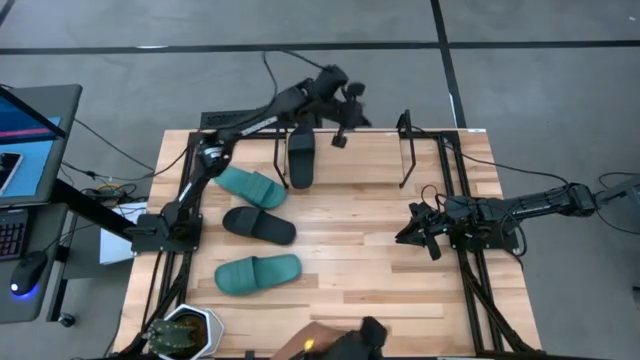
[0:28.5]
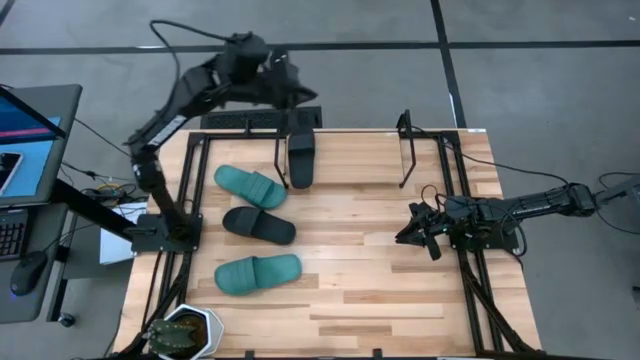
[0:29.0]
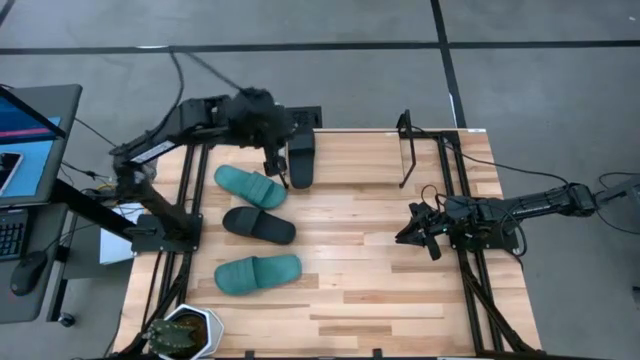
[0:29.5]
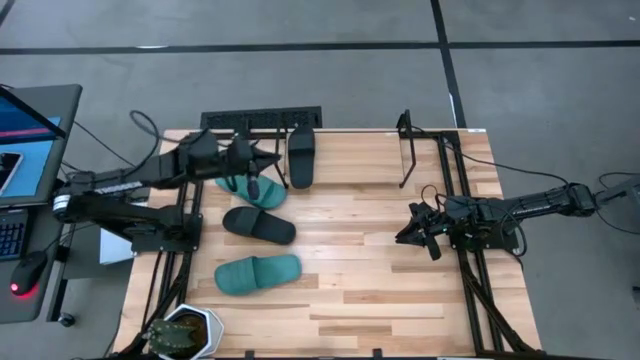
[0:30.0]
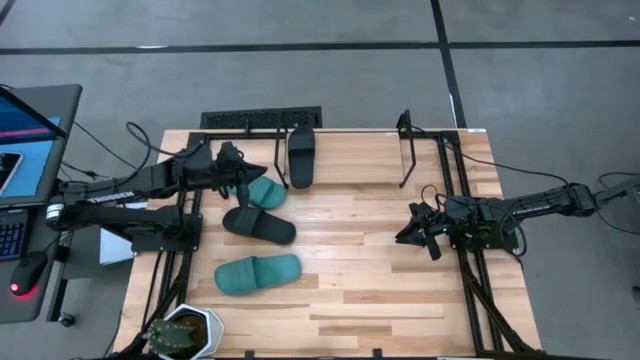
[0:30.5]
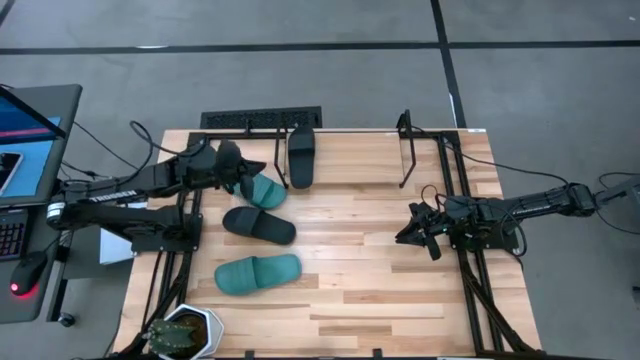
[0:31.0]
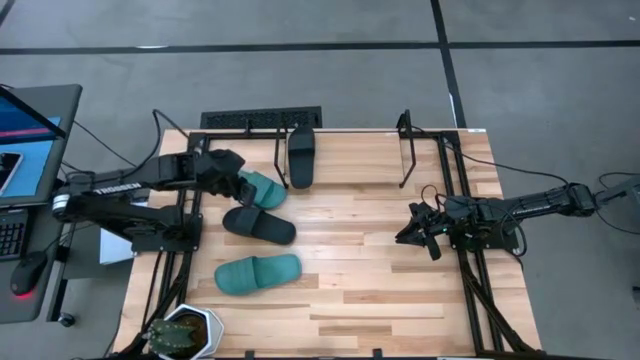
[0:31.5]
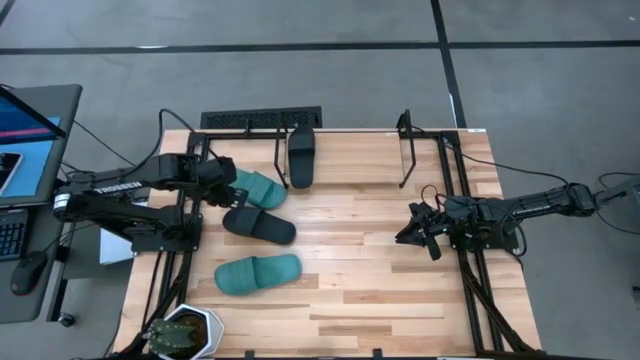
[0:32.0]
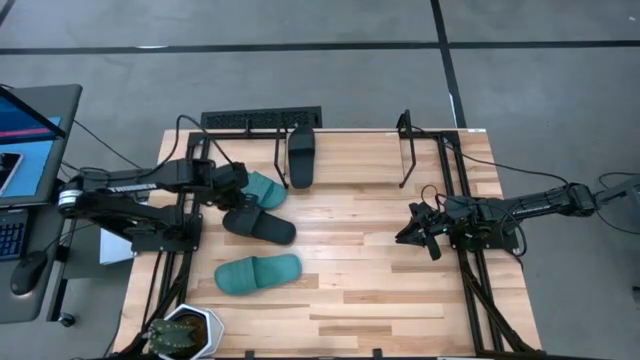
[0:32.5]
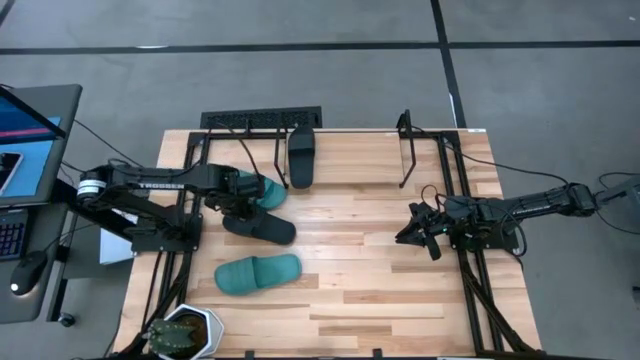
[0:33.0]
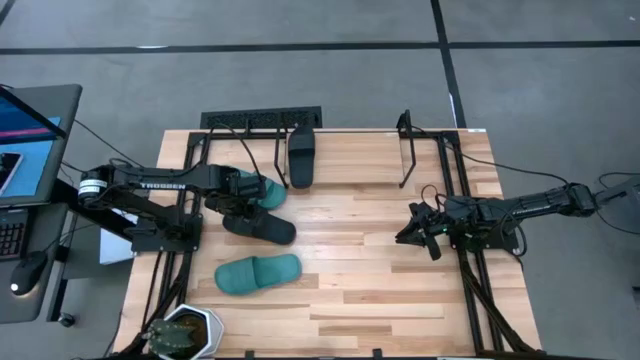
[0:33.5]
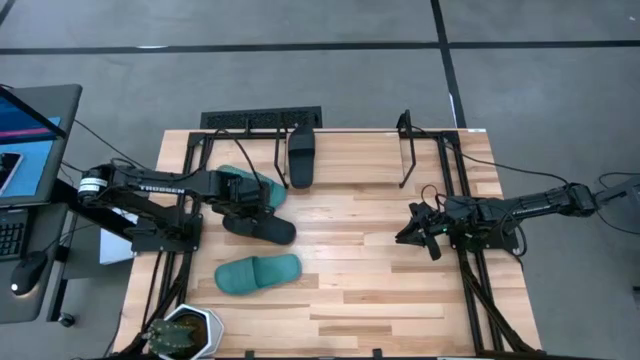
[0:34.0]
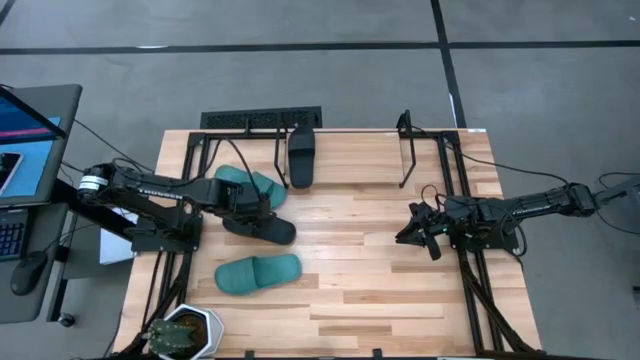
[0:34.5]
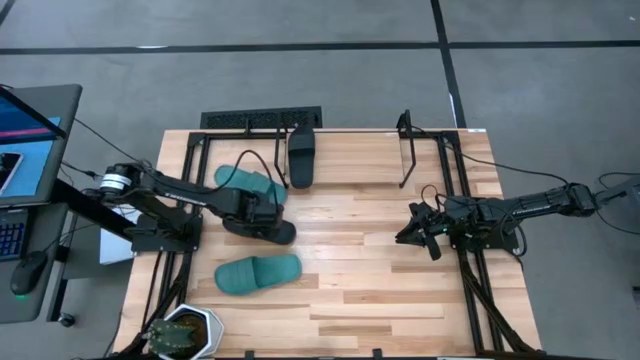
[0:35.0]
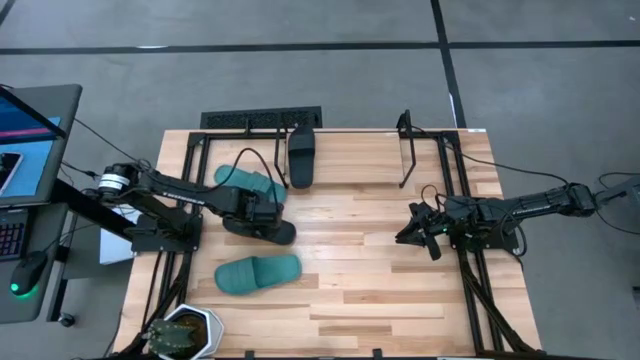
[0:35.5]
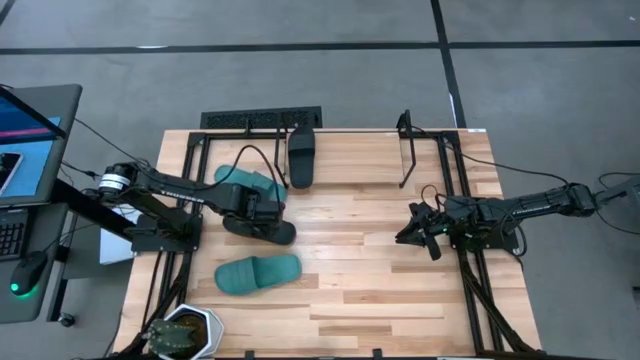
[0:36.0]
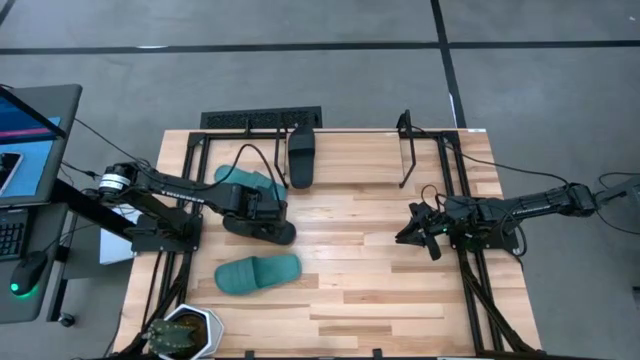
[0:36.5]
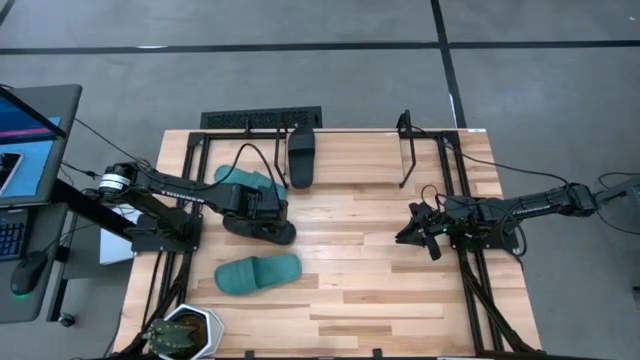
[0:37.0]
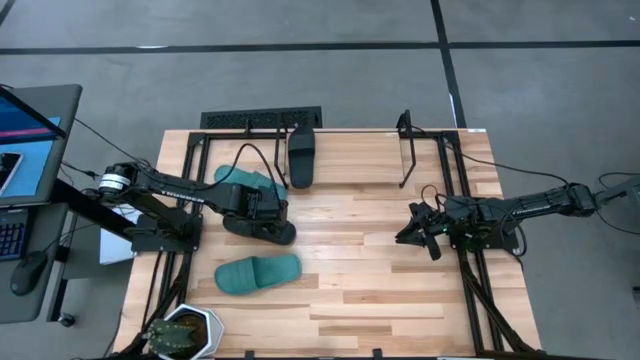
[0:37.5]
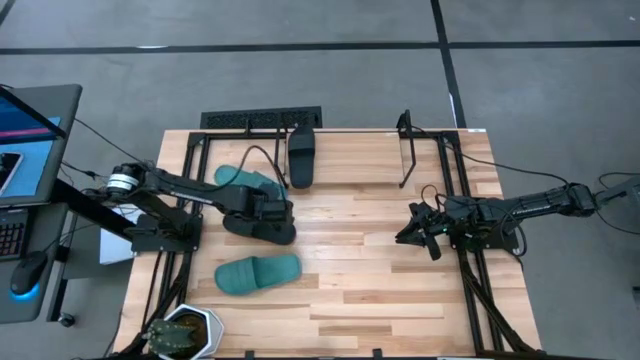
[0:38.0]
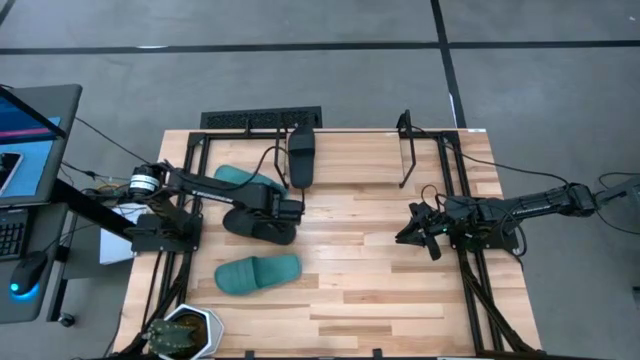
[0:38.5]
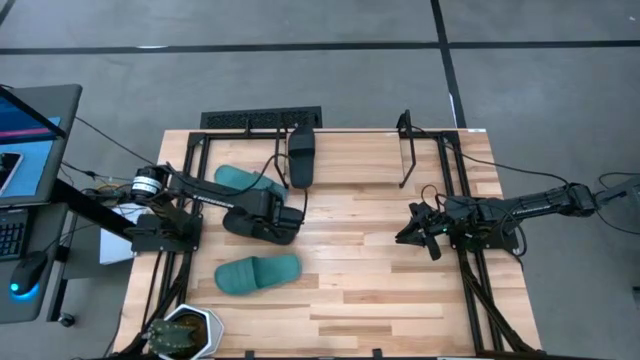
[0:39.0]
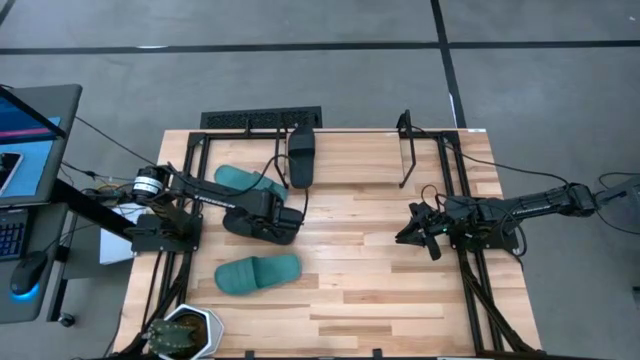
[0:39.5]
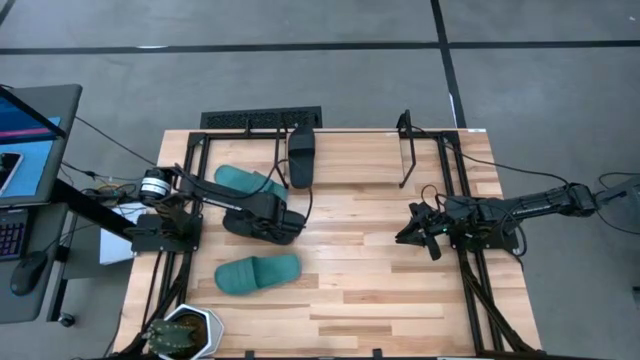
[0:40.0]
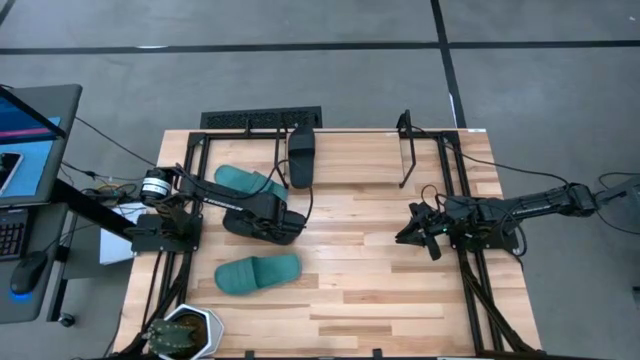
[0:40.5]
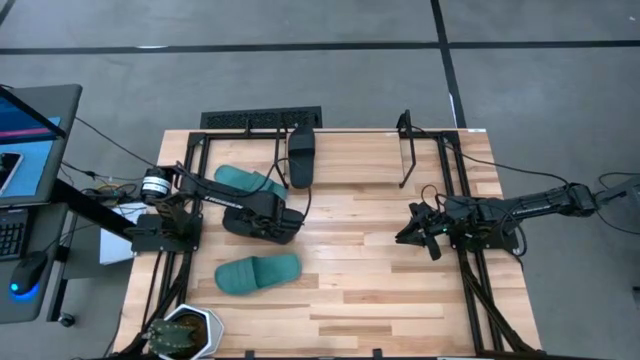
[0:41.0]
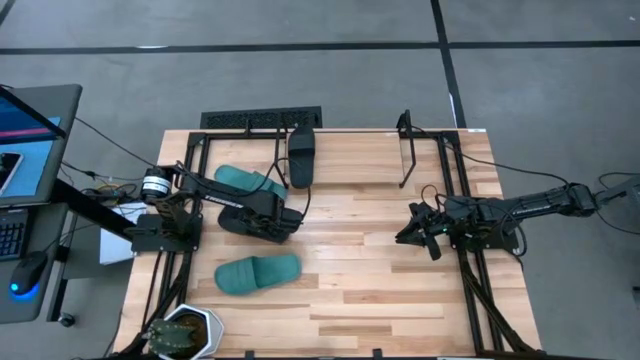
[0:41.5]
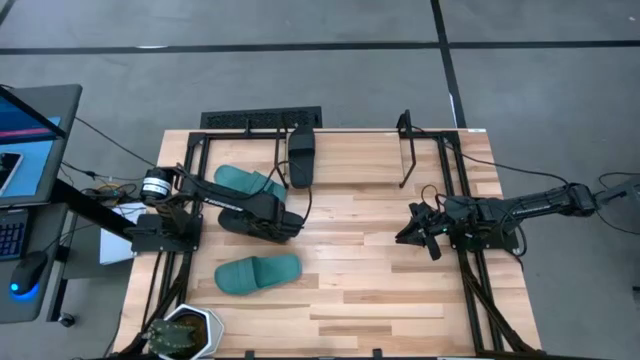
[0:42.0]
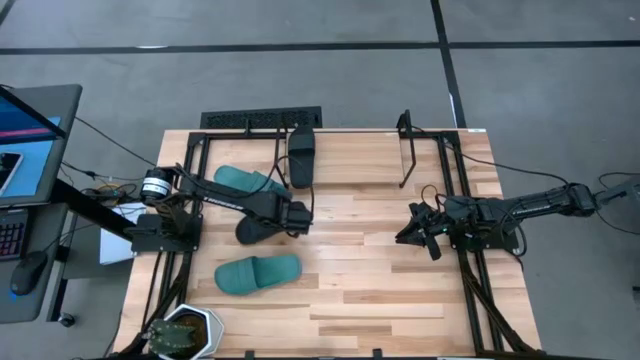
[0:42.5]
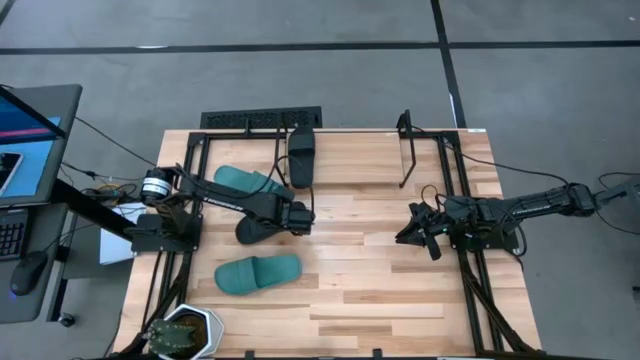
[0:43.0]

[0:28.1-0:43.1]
Task: Pick and place slides into the shelf
Put the black slipper on the shelf

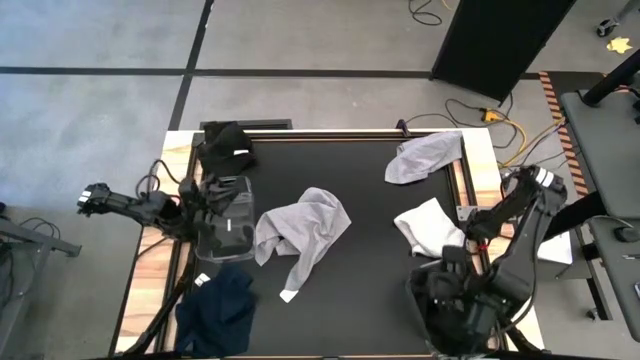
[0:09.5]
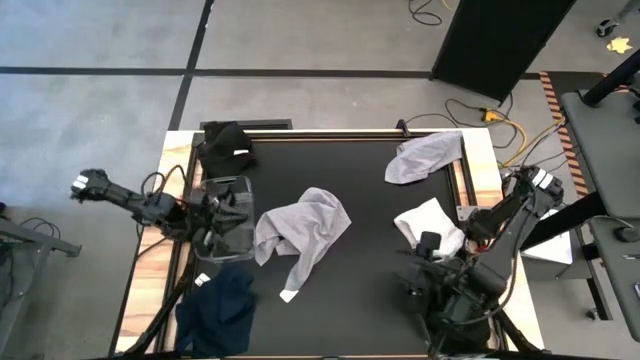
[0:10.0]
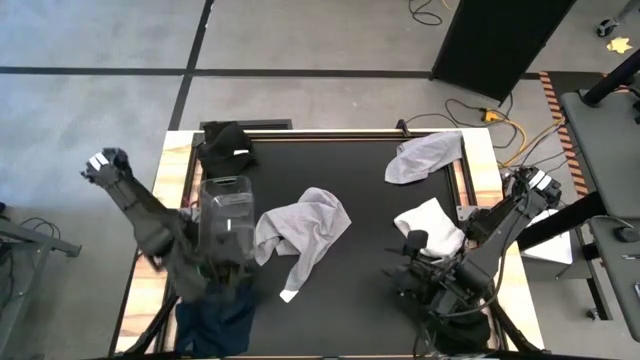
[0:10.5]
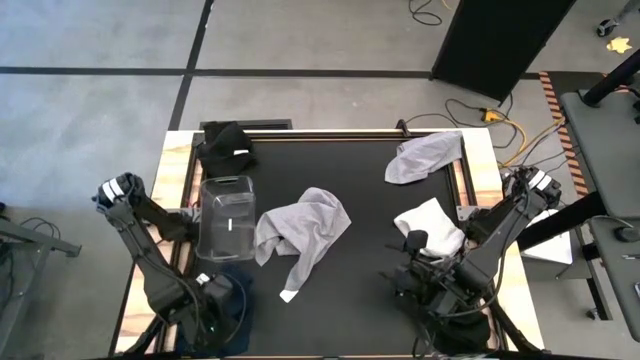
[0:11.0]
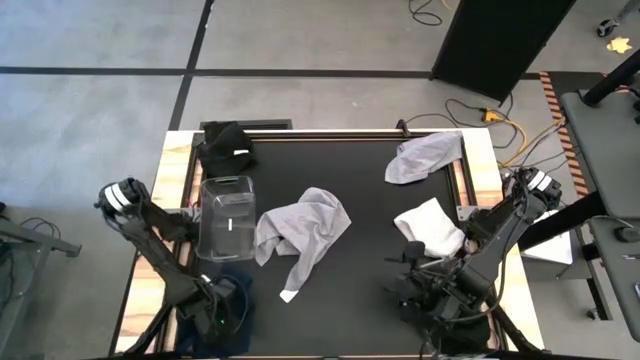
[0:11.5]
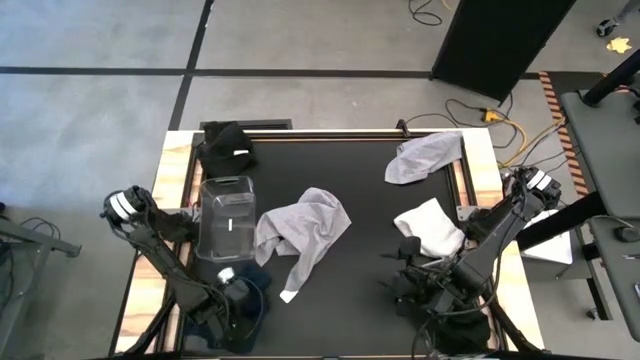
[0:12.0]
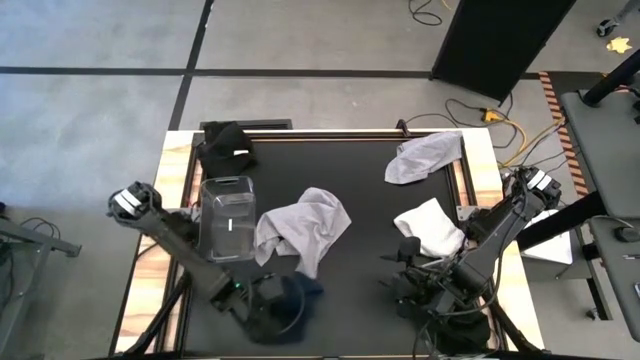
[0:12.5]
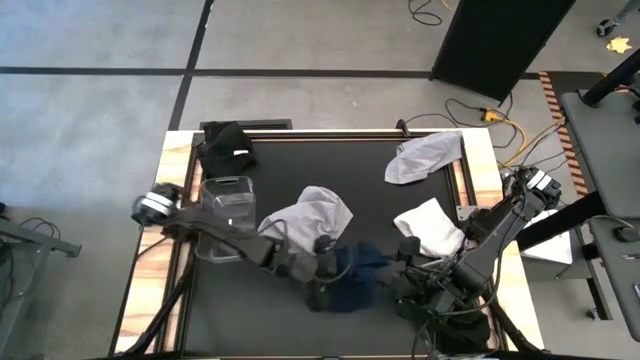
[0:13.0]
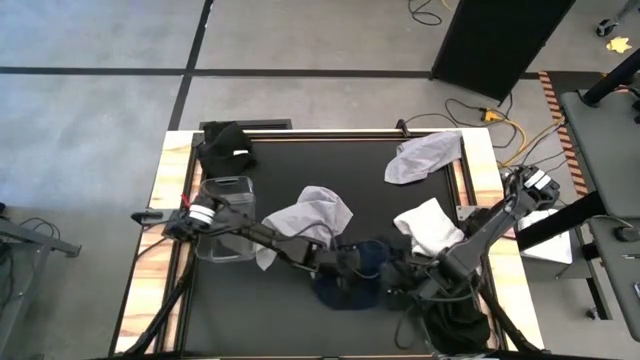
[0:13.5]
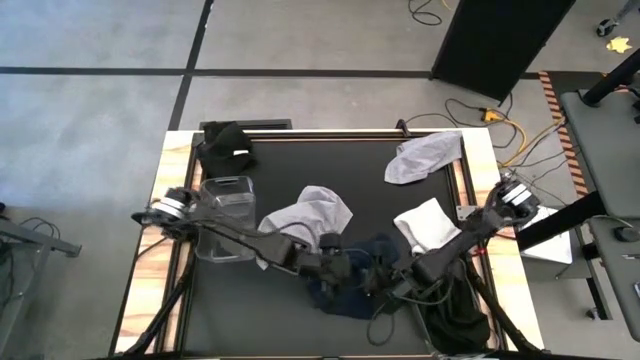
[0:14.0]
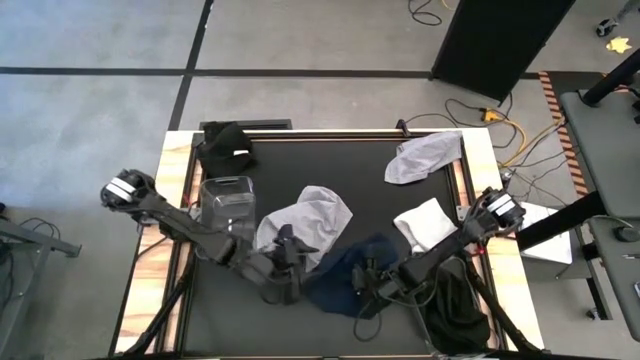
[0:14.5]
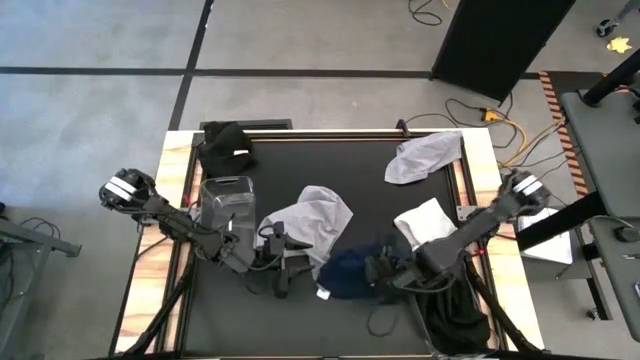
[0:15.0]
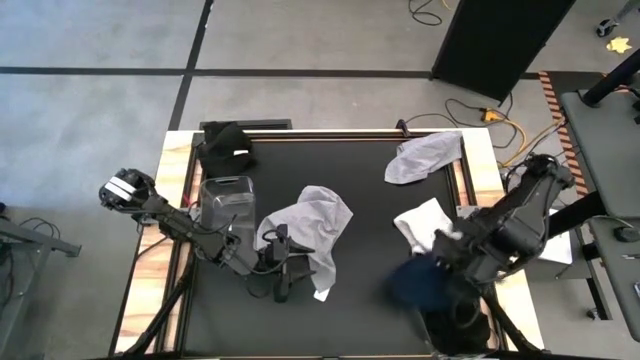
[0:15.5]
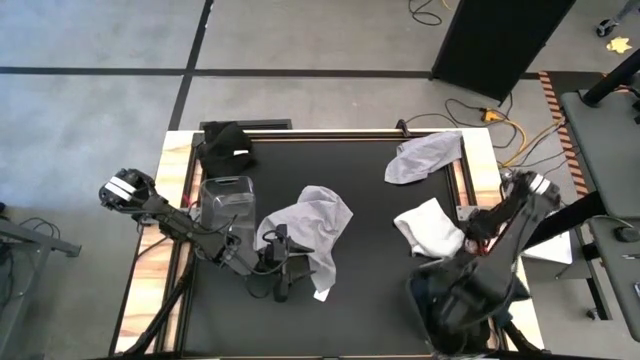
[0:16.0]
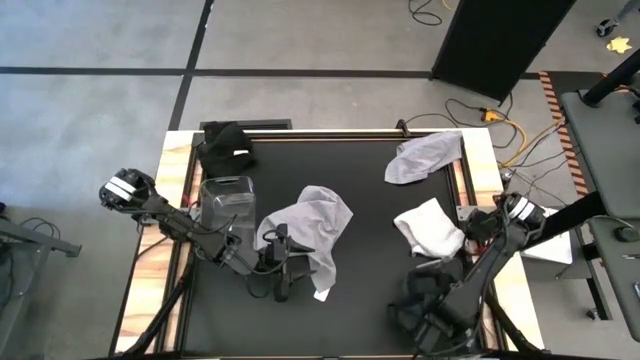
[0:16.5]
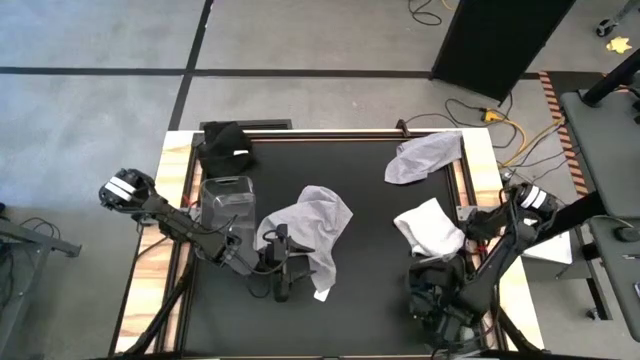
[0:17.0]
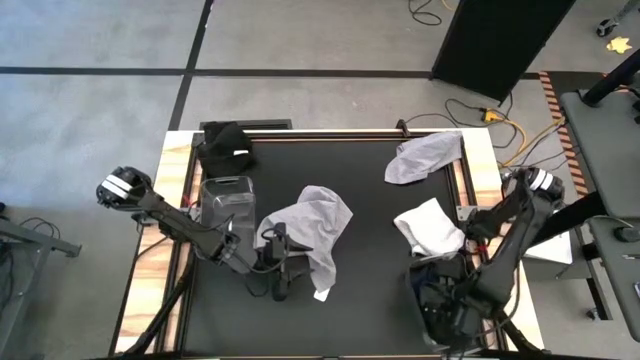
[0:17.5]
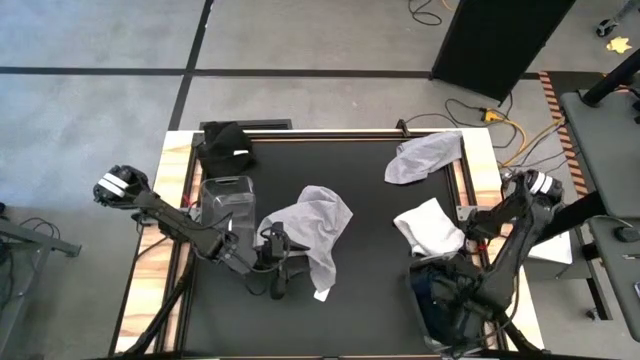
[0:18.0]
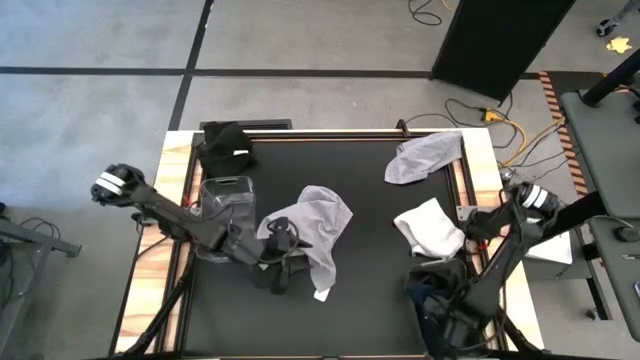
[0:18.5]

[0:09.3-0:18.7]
Task: Sort towels by color in basket
Put the blue towel into the bottom transparent bin
